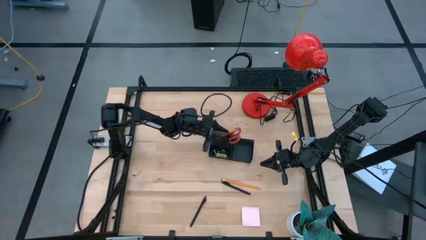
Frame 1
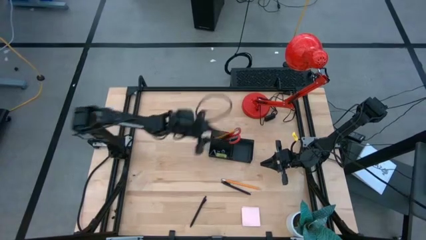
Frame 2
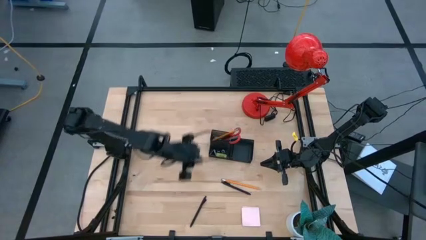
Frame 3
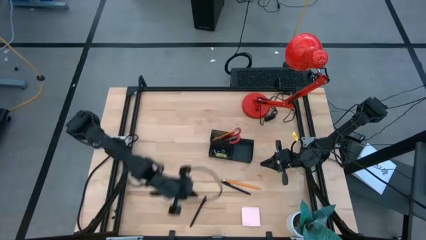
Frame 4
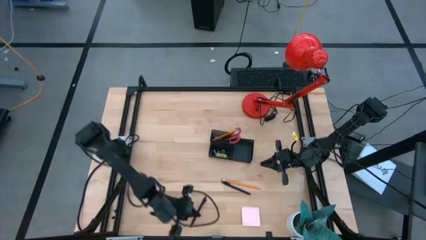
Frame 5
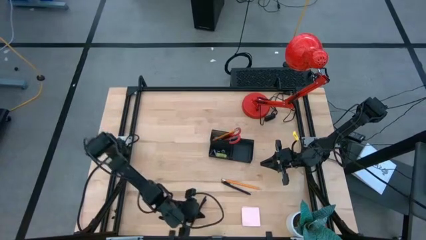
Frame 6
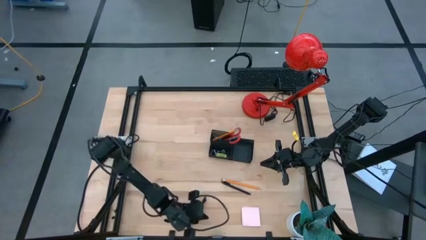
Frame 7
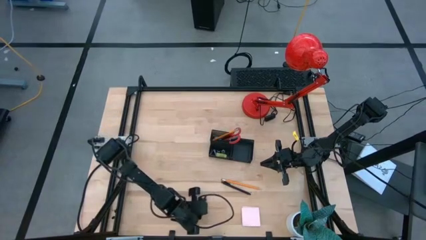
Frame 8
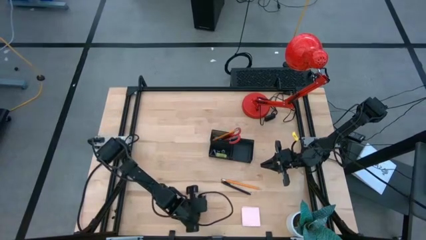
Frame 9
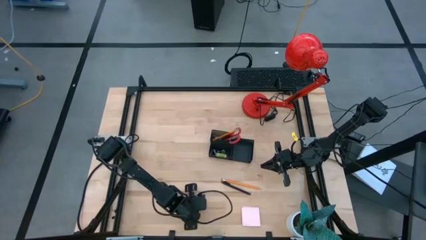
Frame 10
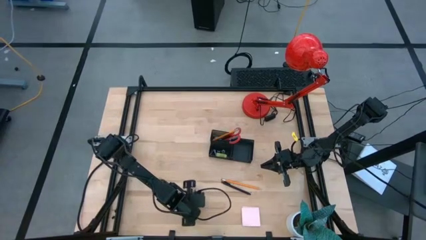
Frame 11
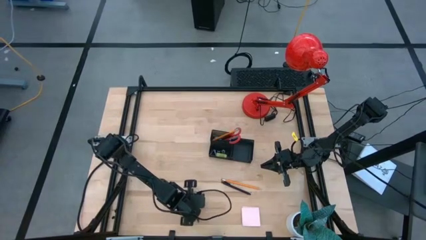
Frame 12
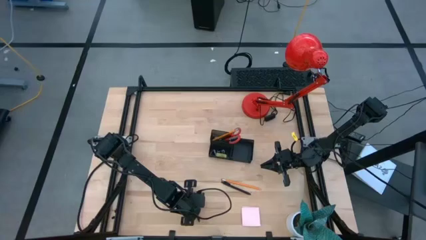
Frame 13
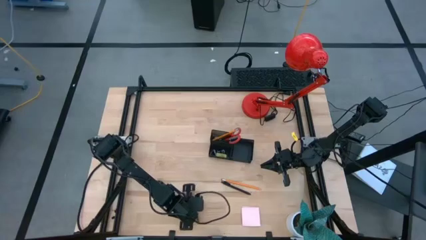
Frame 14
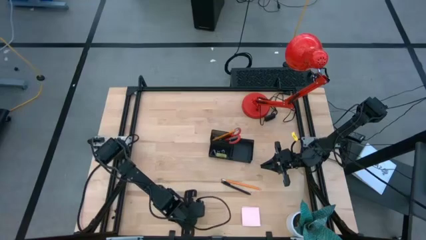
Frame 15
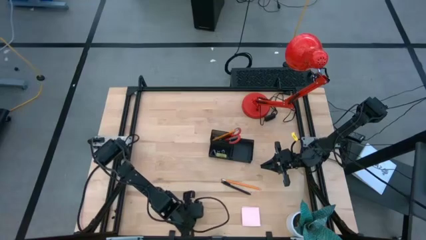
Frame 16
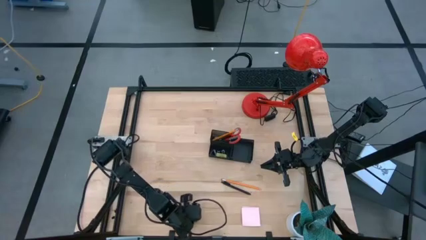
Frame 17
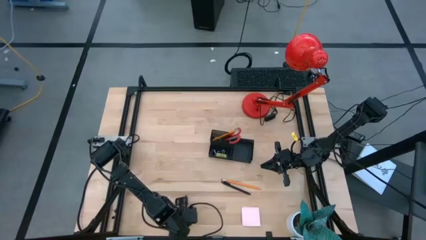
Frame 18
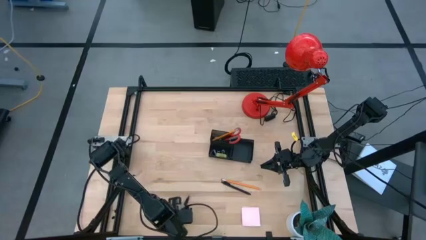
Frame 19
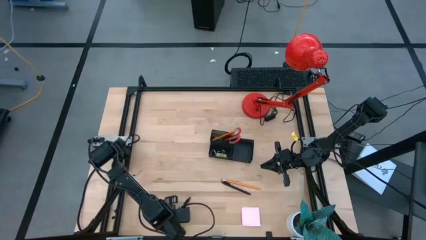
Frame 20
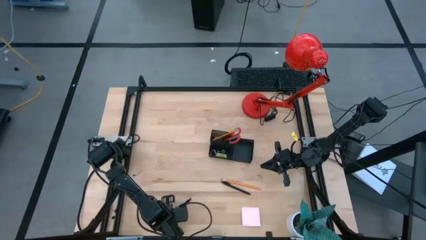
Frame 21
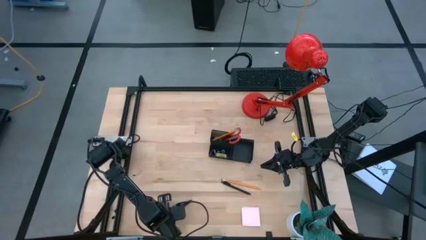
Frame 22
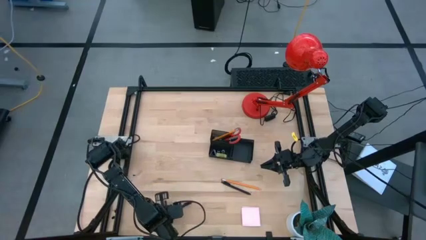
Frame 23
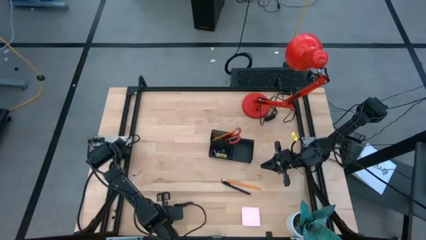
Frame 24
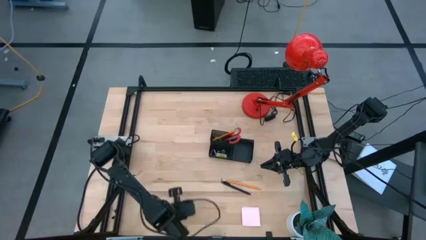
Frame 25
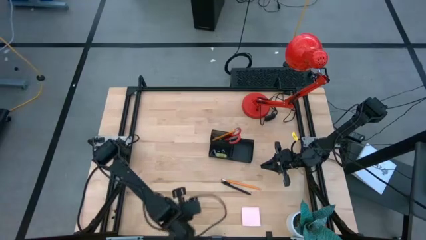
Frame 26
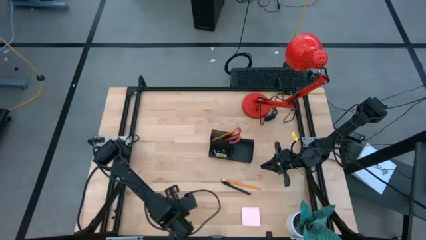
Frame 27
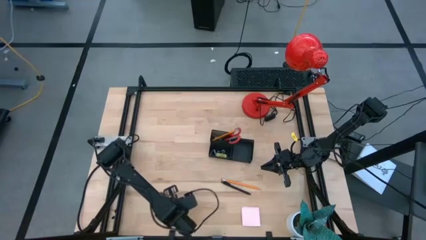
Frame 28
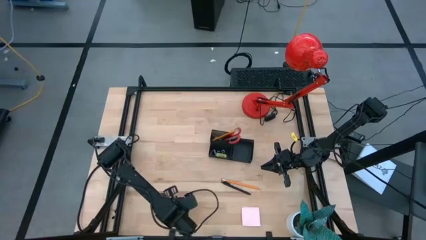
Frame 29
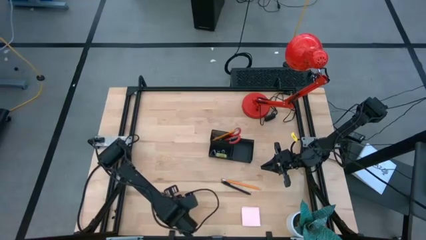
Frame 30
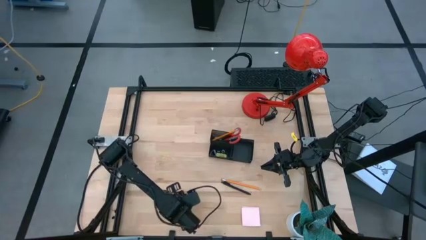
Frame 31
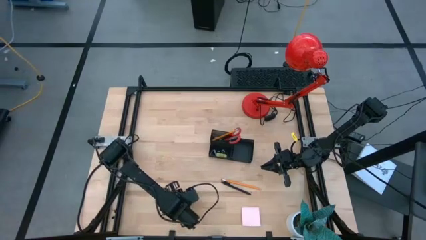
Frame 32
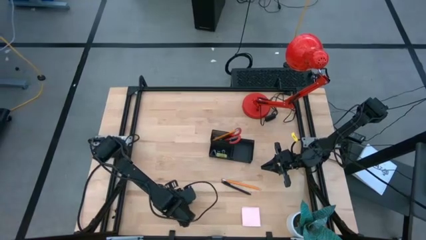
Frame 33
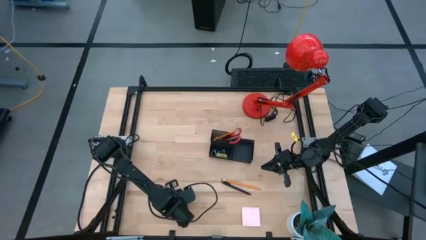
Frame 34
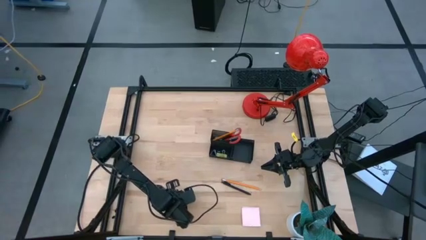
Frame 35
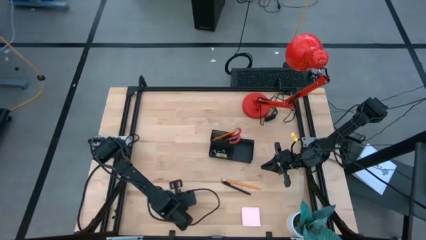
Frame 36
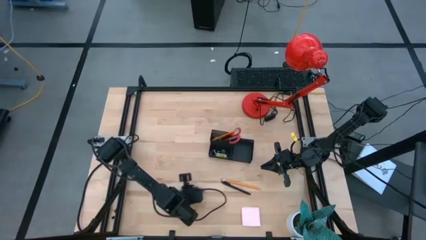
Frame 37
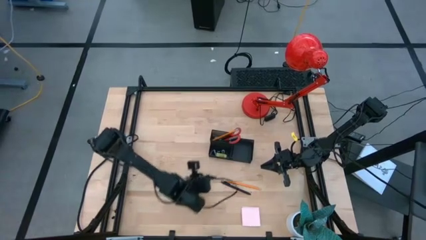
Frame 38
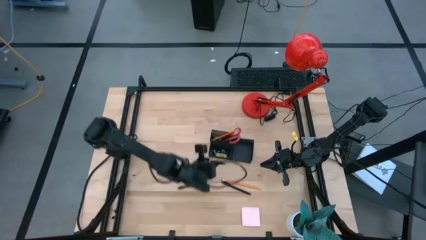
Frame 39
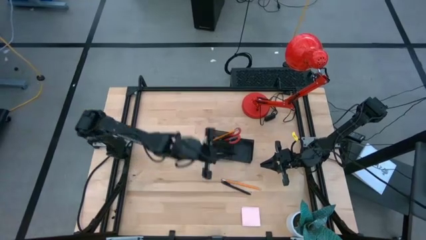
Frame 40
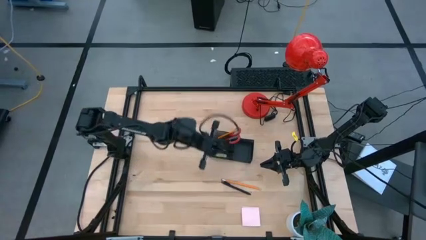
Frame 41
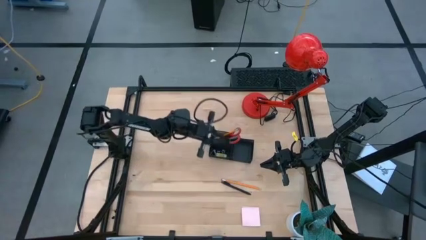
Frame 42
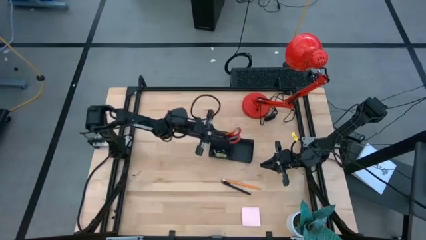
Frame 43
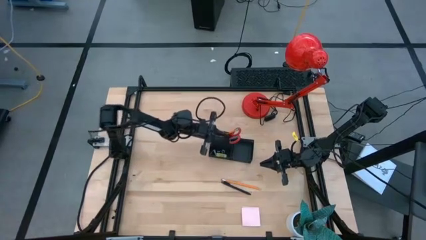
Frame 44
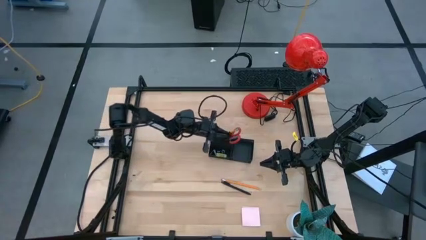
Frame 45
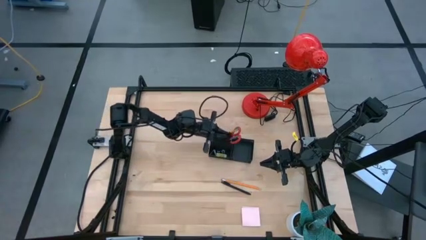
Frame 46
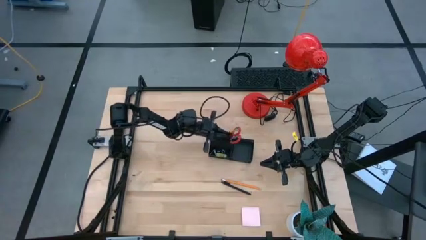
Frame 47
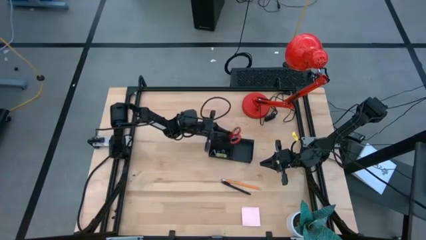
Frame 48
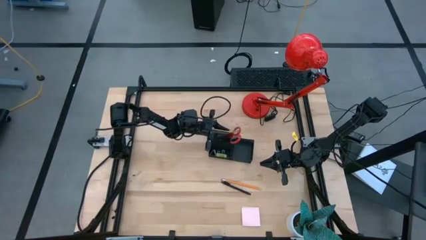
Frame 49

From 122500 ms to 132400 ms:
Task: Pick and place office supplies into organizer
Put the black pen into the black desk organizer
